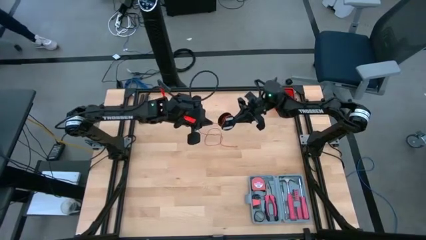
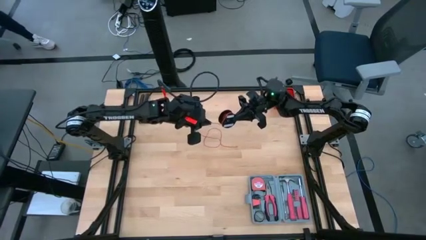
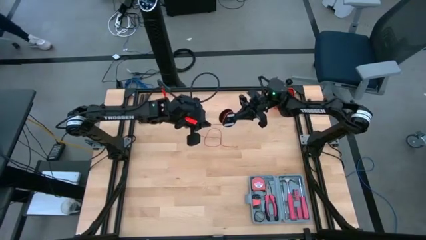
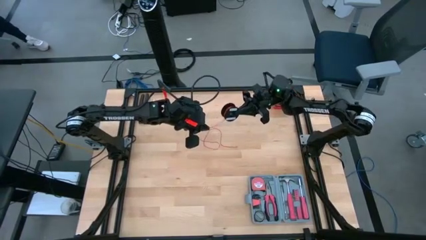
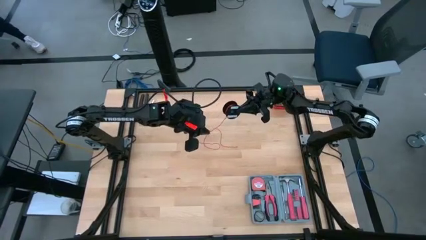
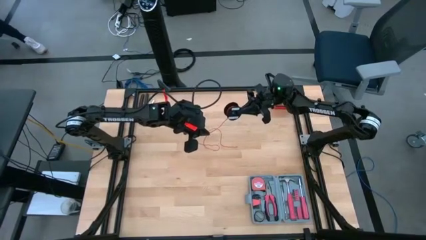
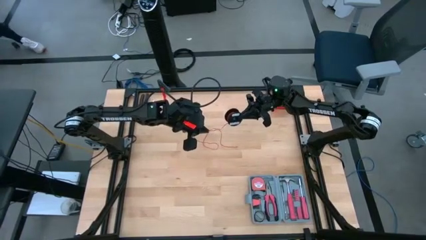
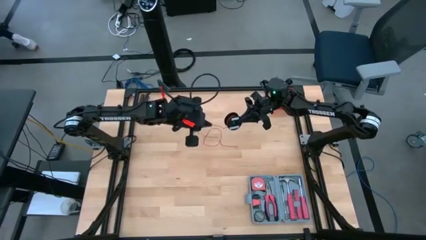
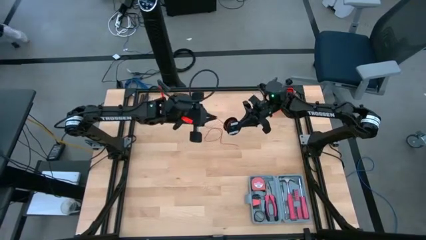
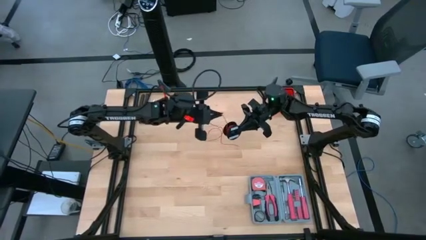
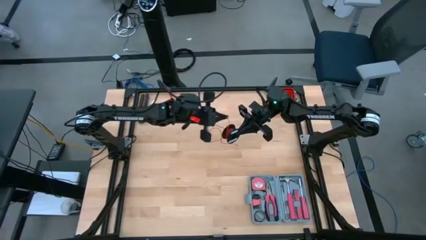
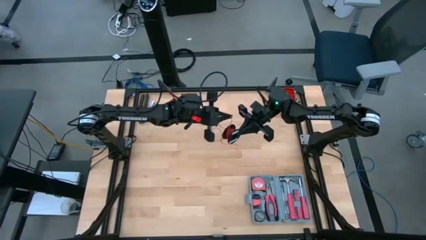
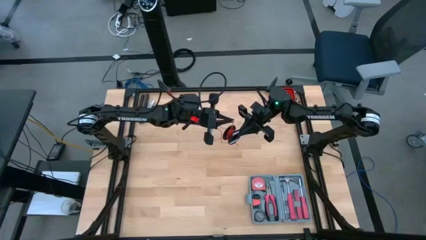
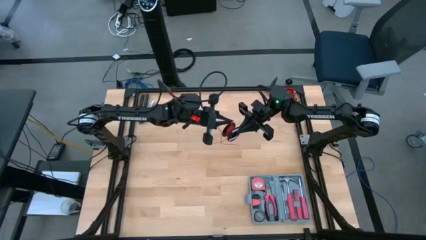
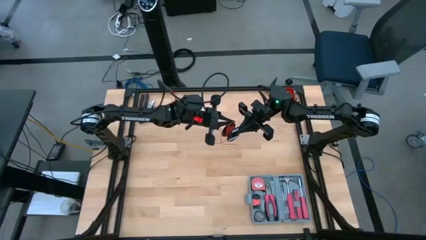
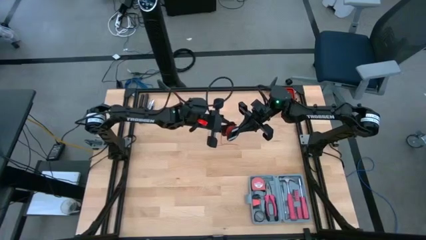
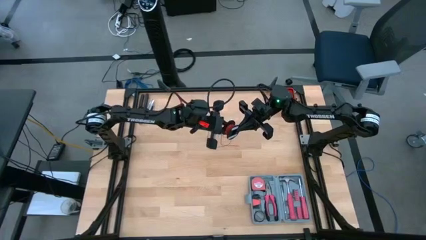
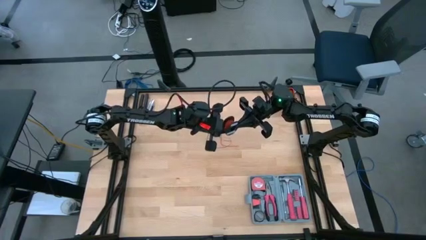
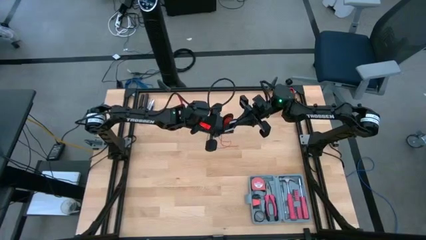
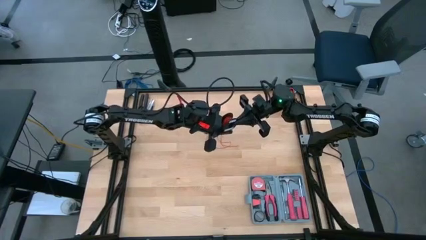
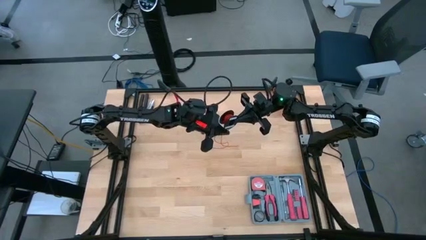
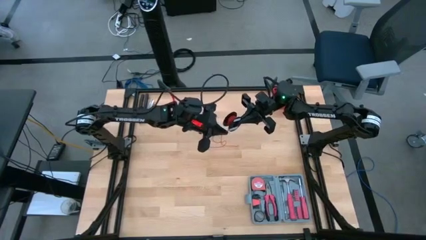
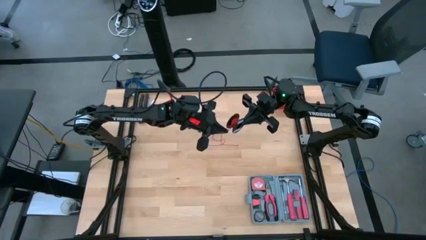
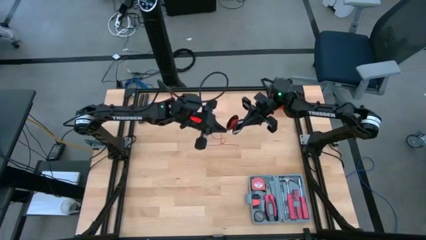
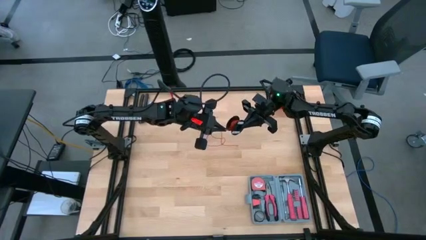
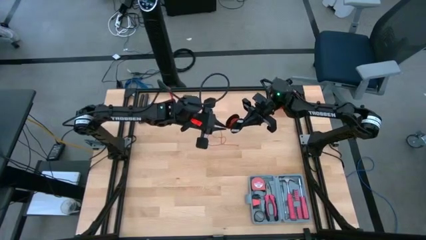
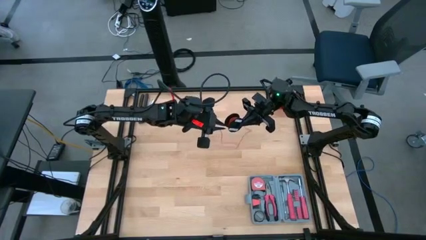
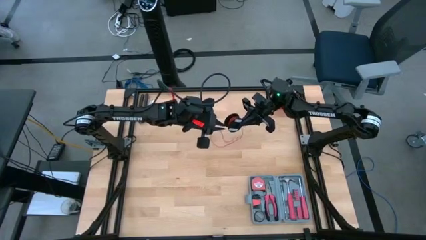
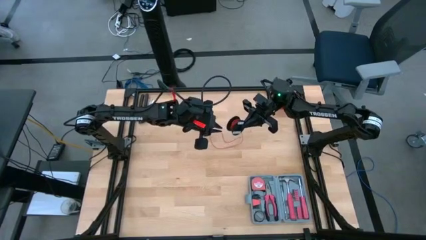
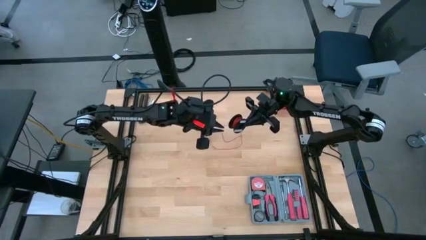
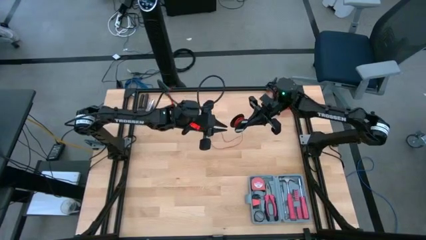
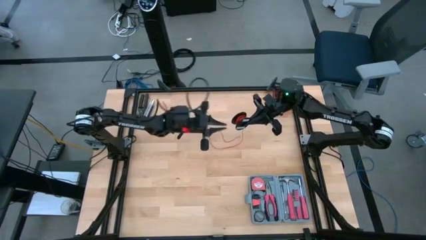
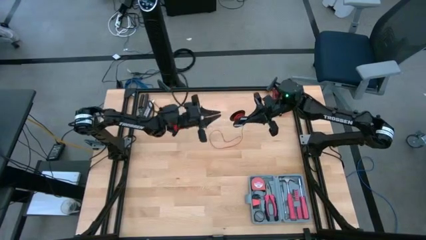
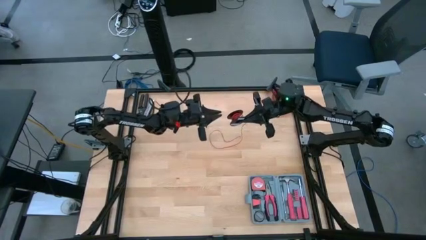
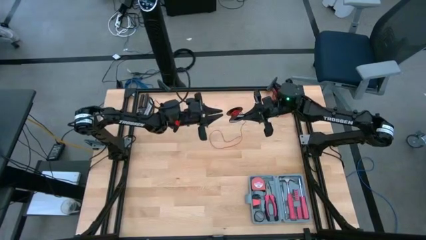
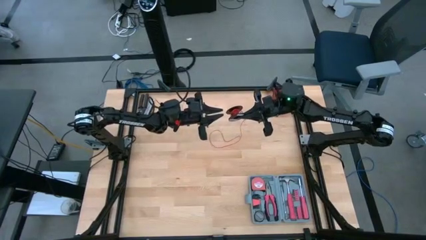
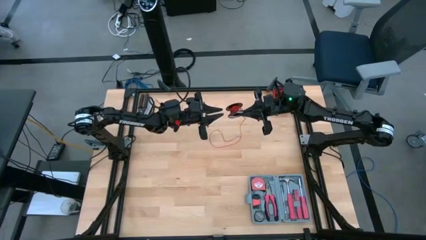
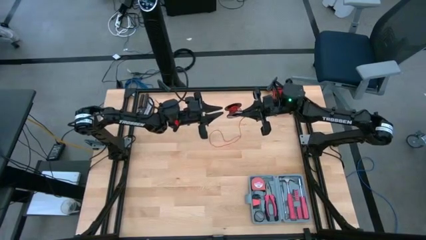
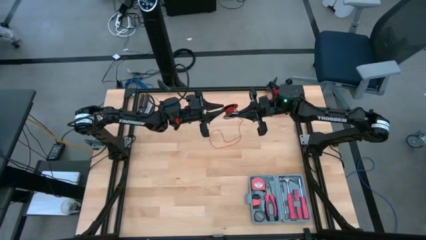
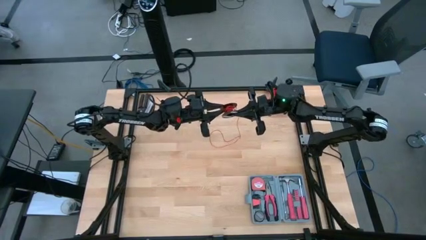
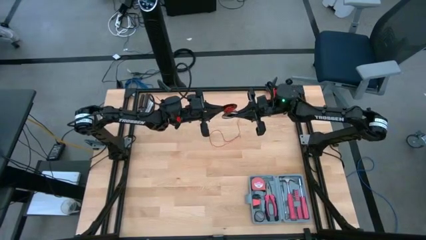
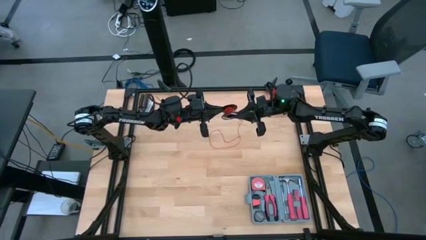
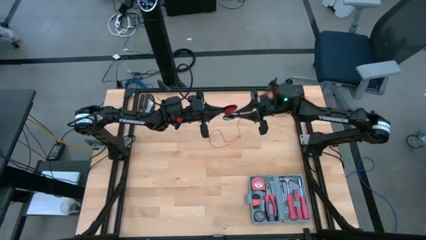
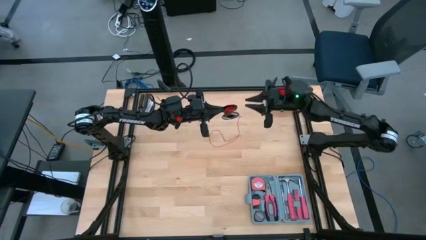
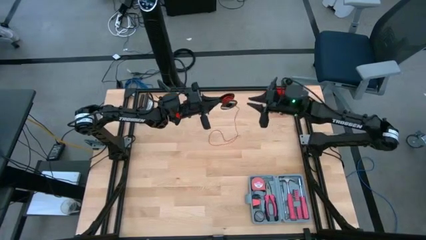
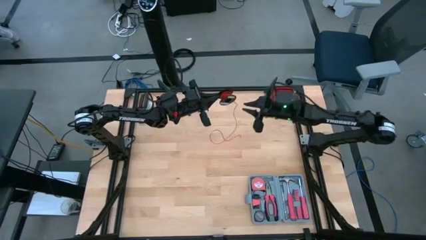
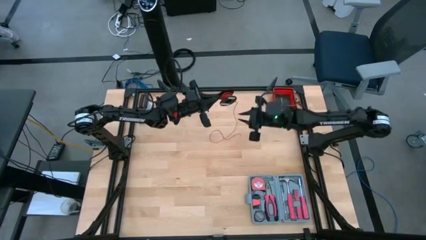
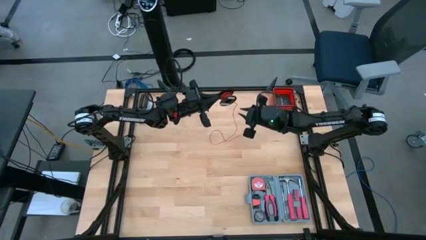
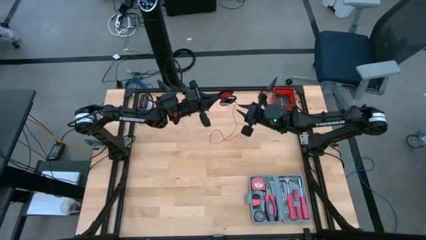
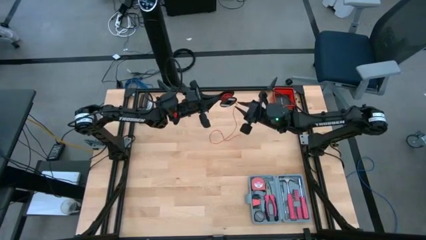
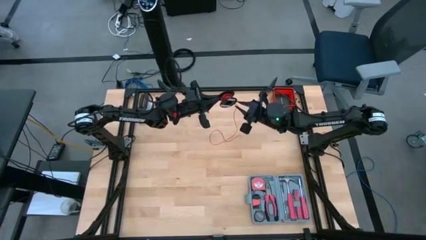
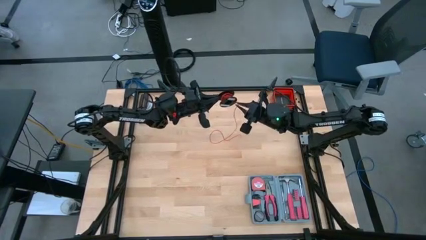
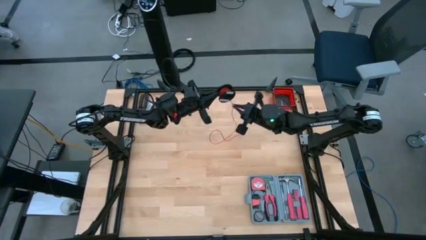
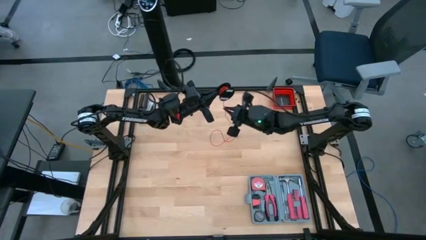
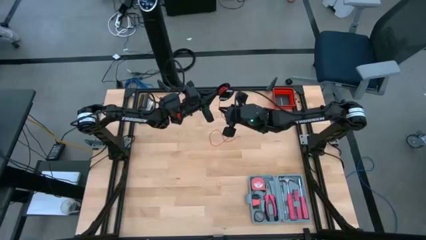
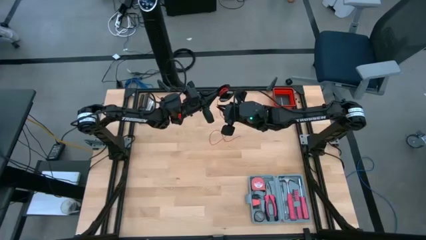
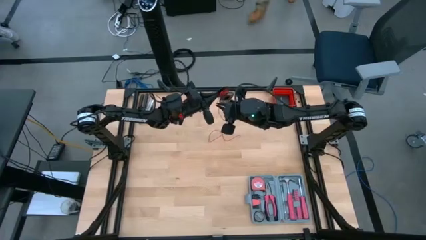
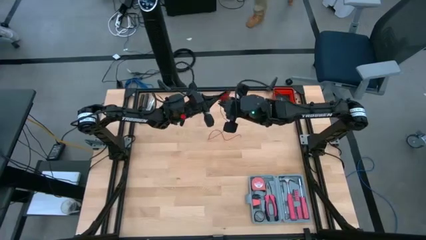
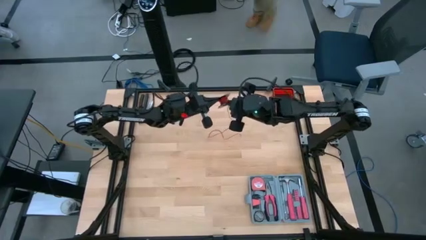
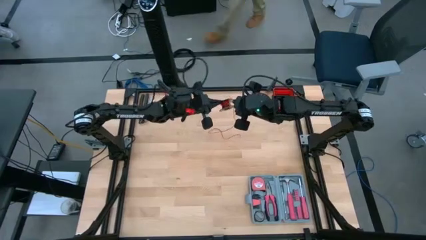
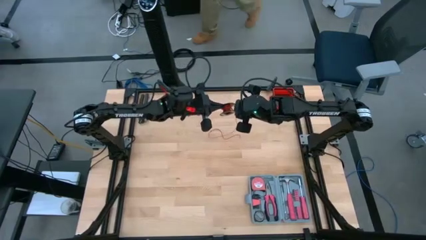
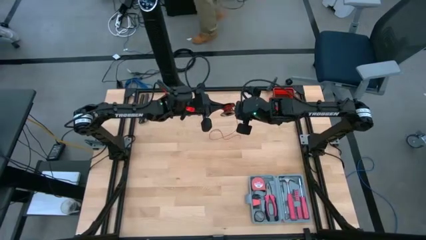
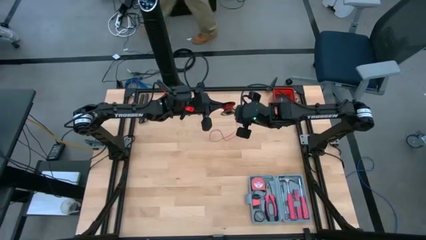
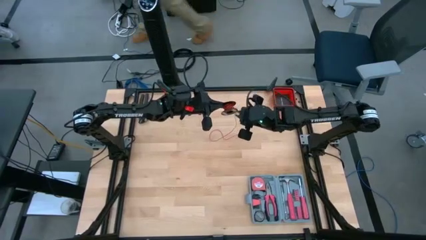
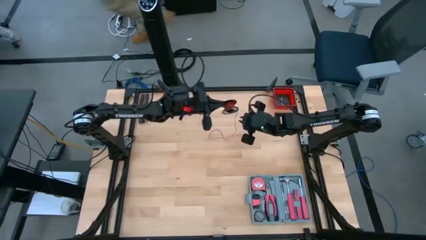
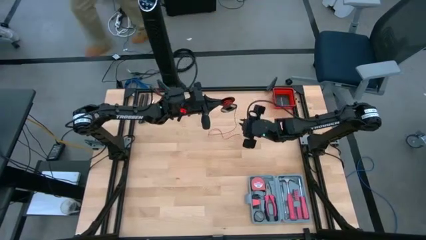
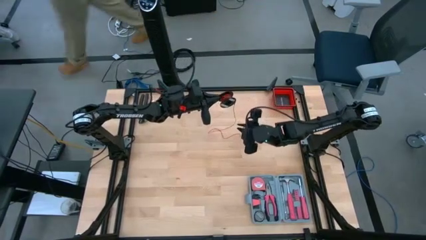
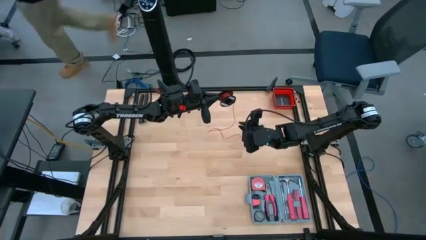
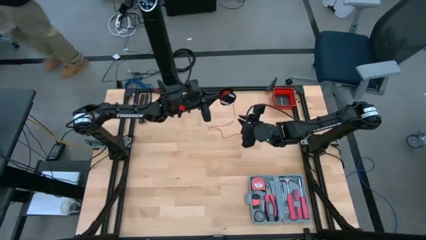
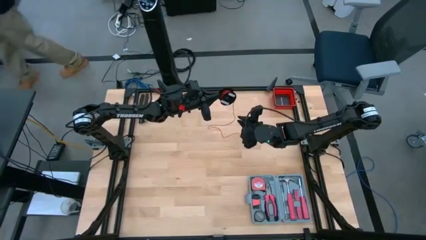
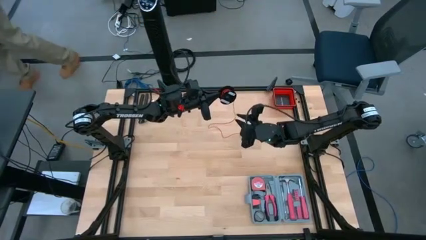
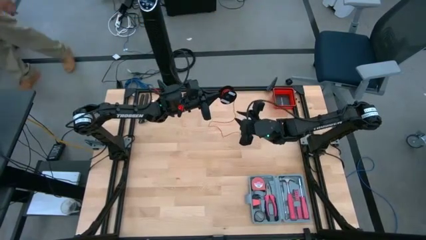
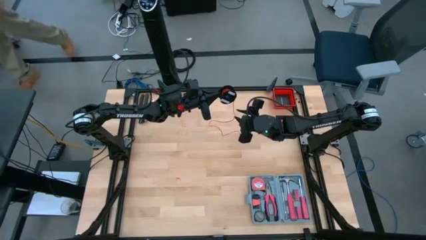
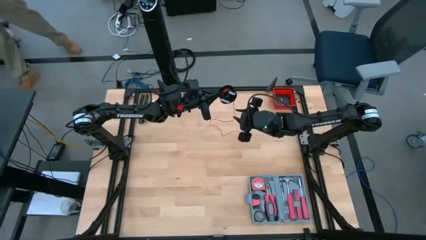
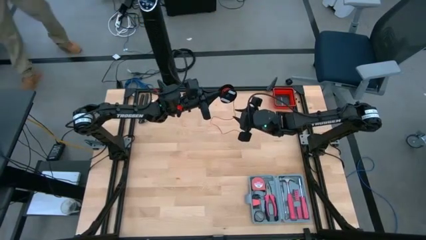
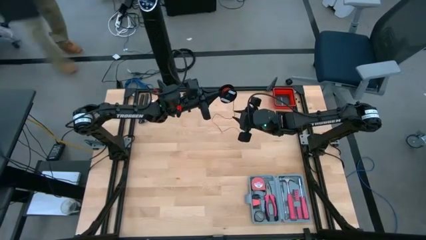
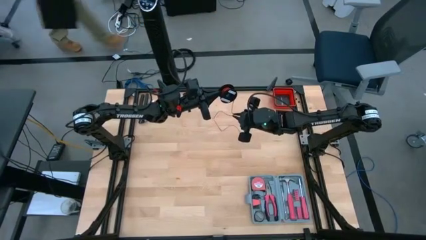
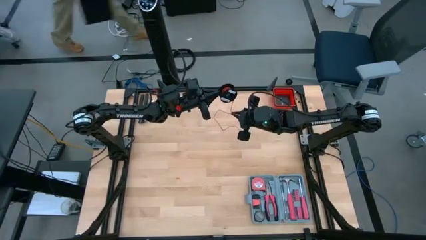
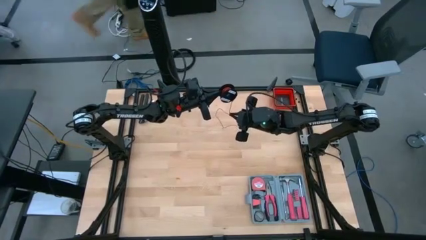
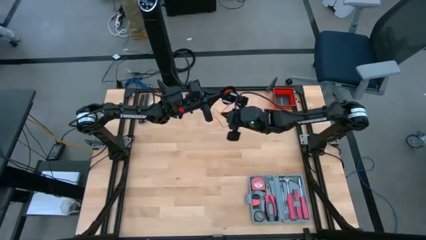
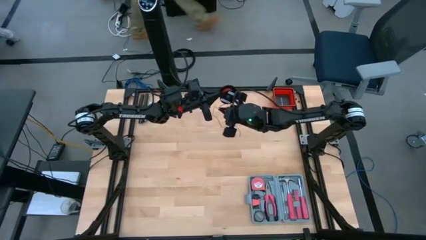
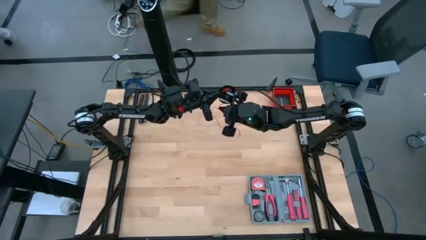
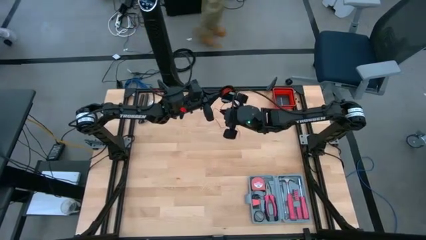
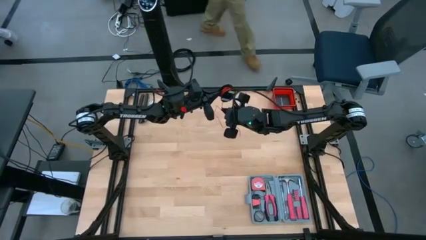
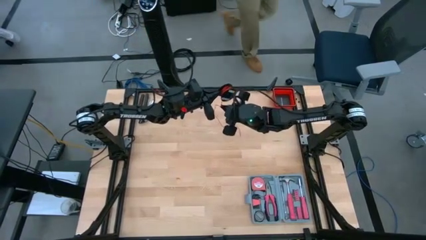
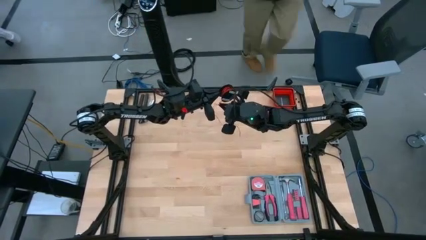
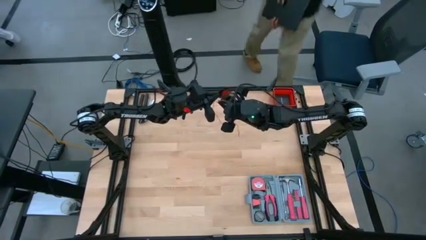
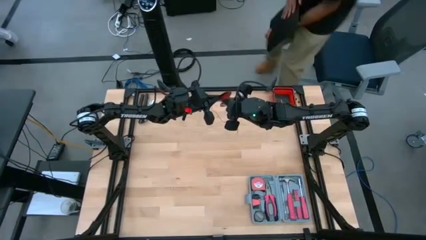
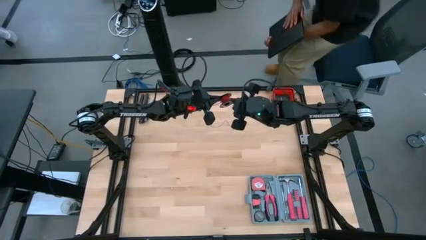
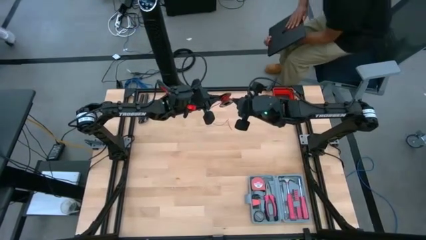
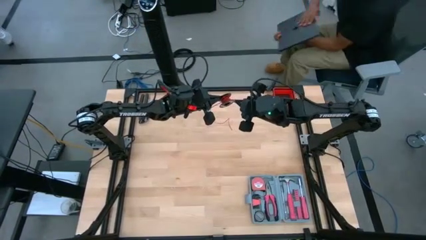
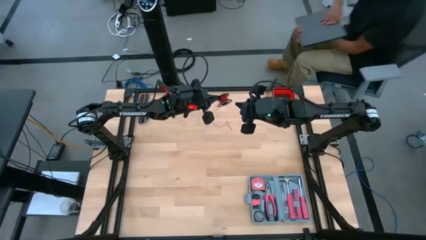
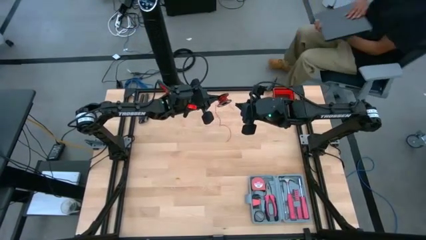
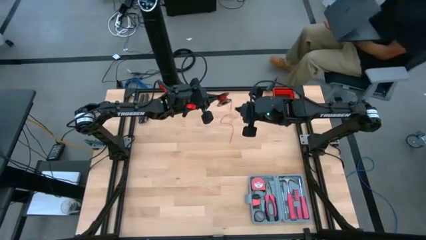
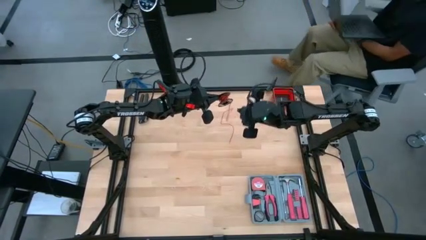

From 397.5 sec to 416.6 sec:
Task: Coil cords
Coil the wire
